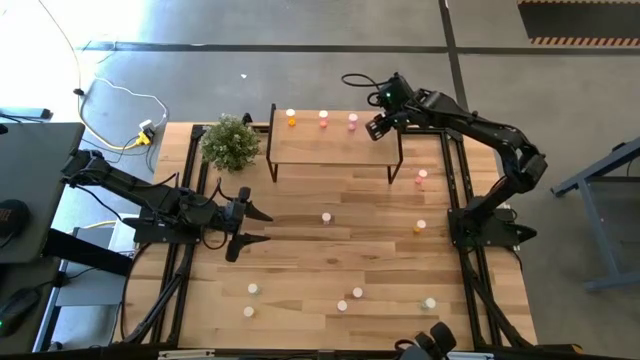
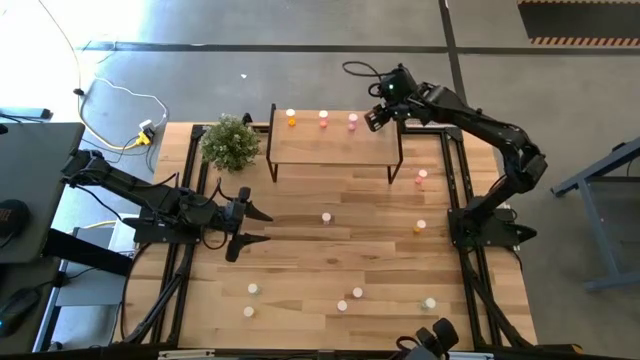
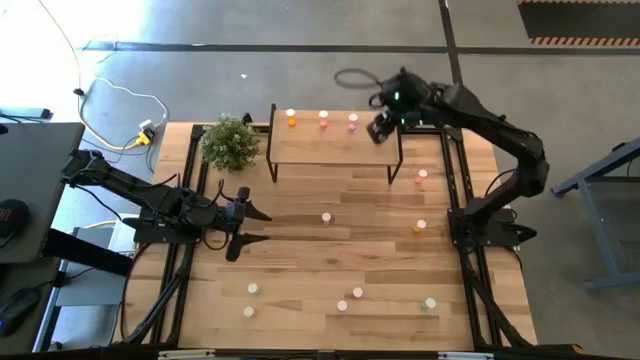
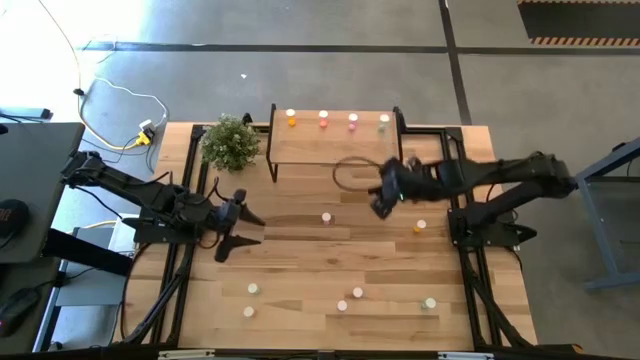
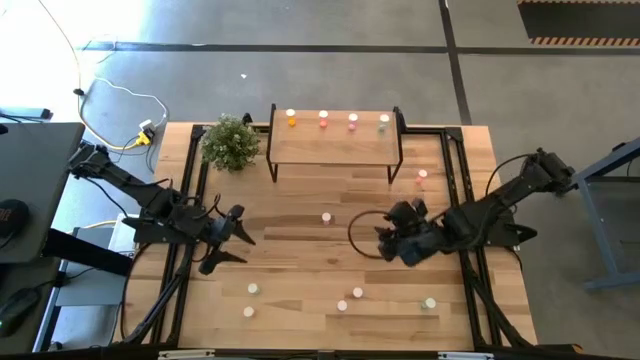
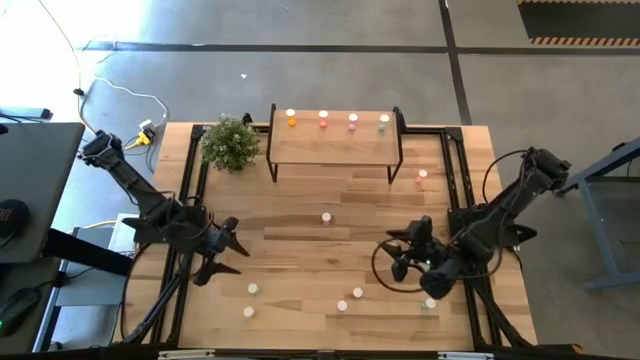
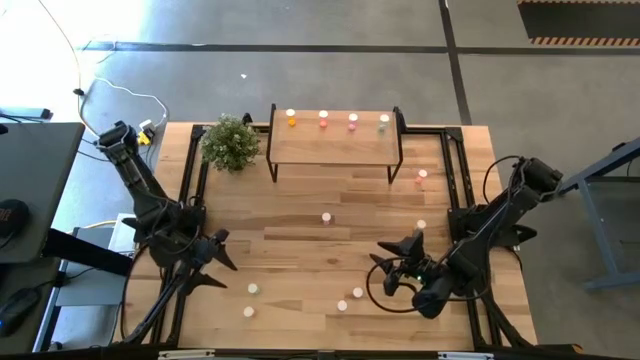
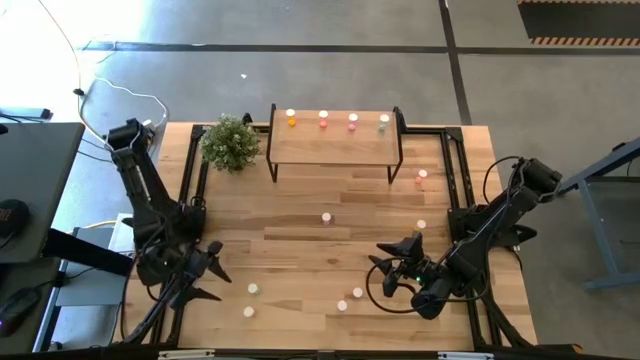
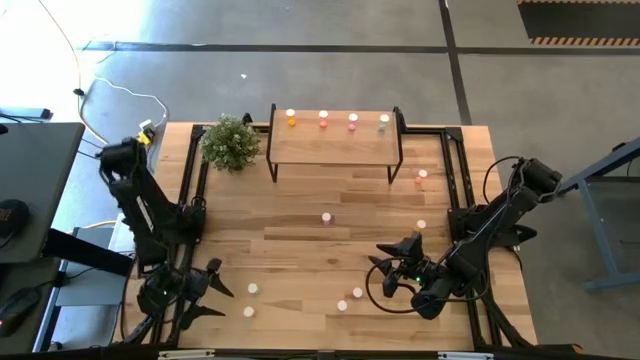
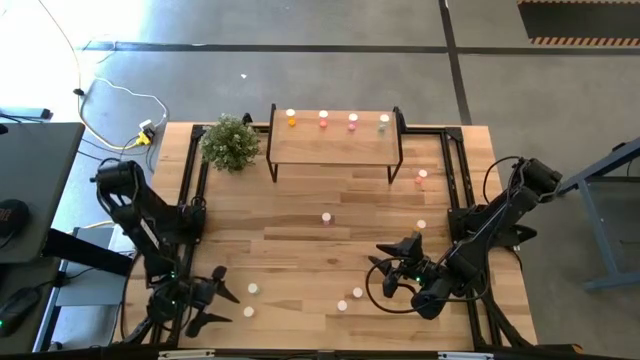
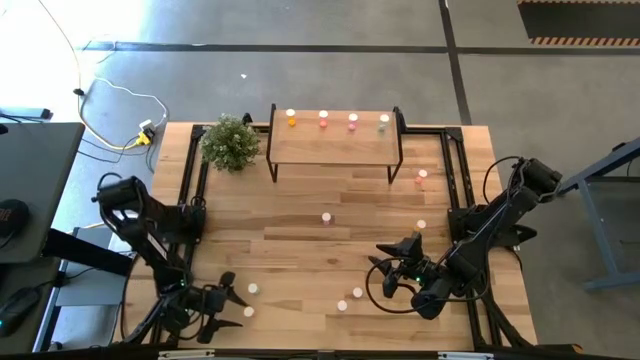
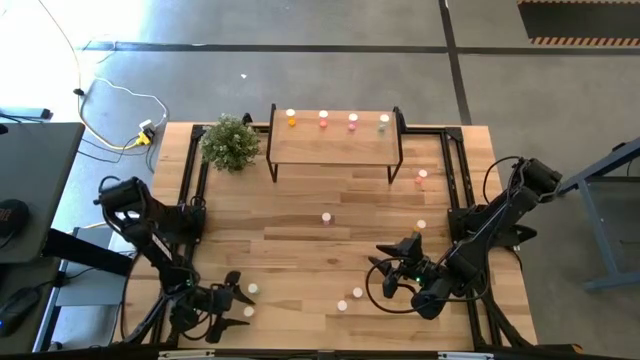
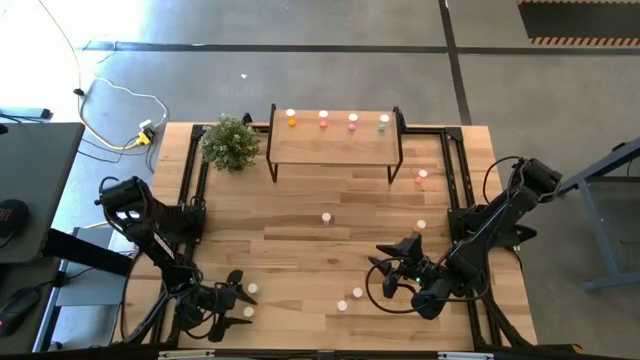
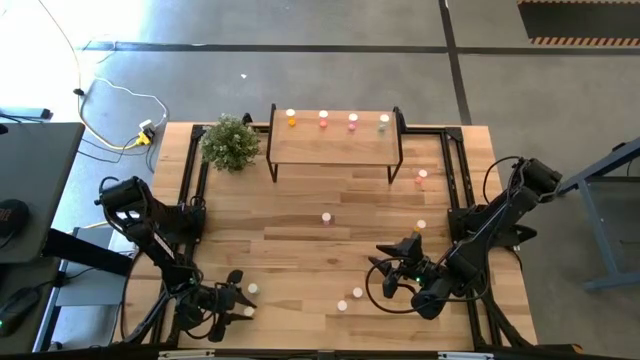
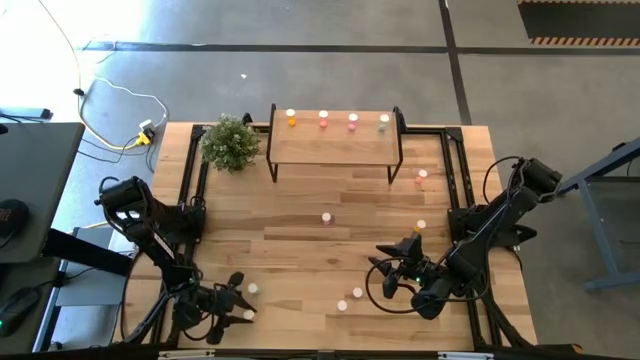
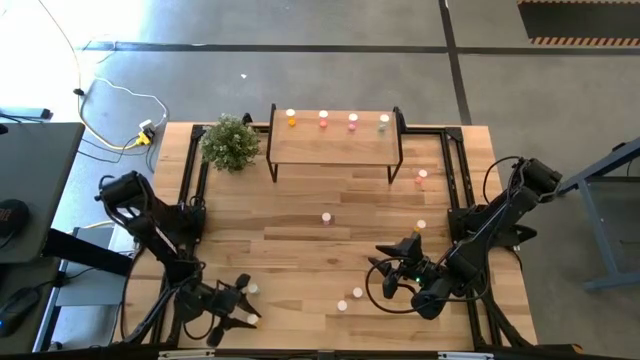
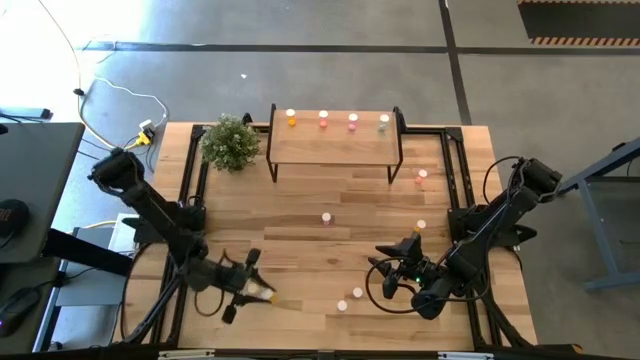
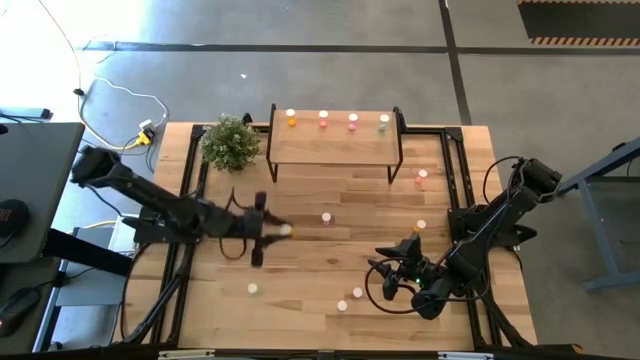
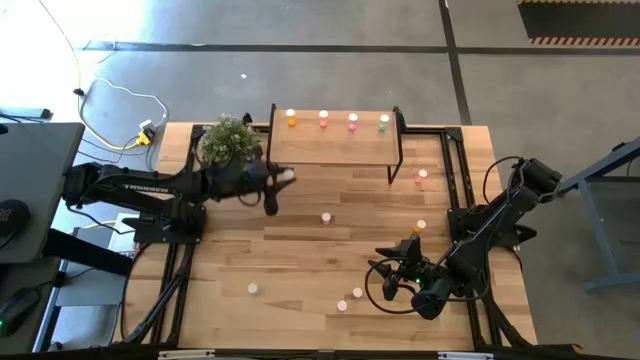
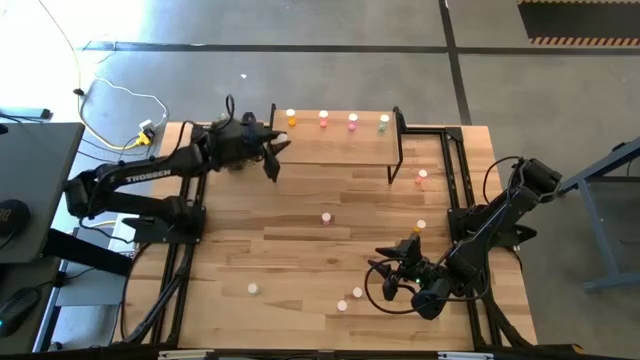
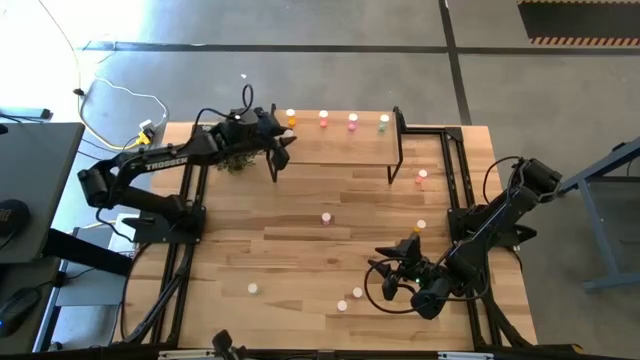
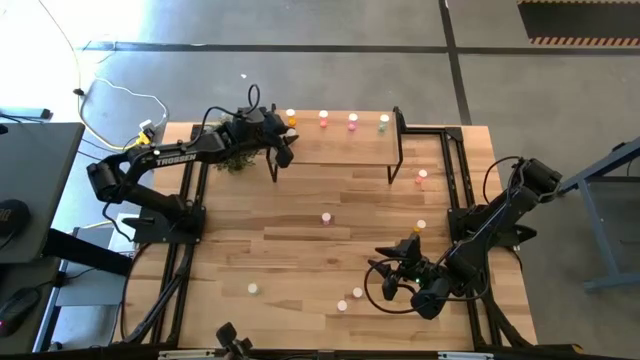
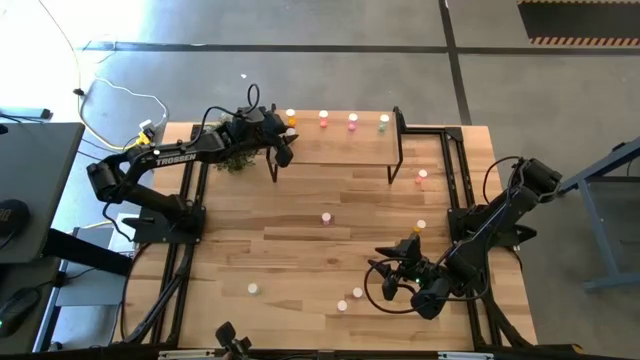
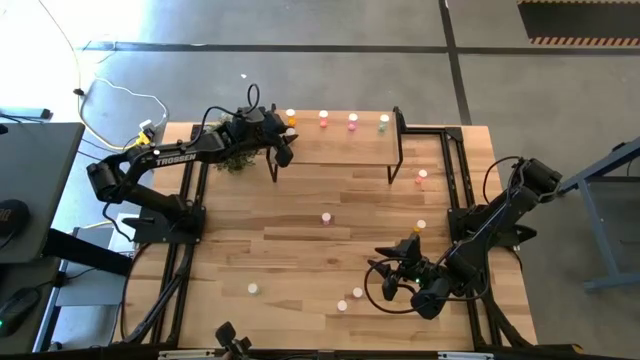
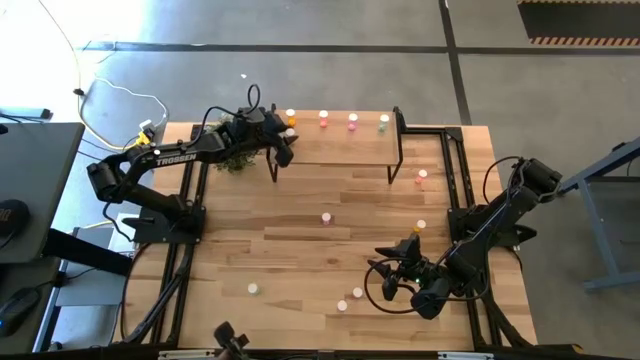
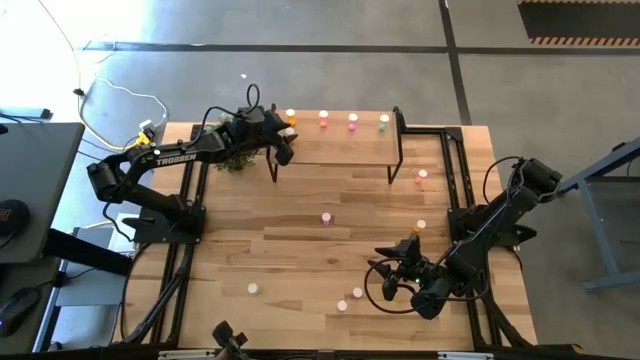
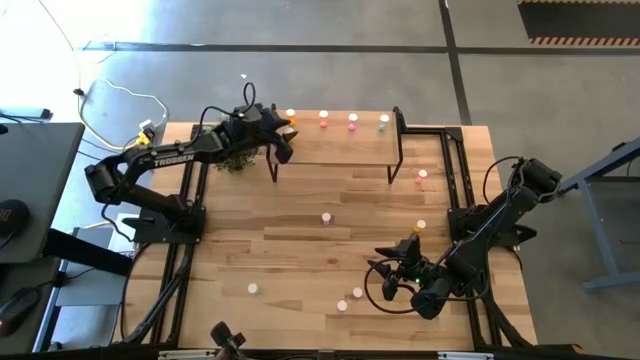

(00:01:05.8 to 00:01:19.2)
Task: Pick and place medicine bottles onto shelf by color
Put the bottom orange pill bottle aligned with the other orange pill bottle on the shelf

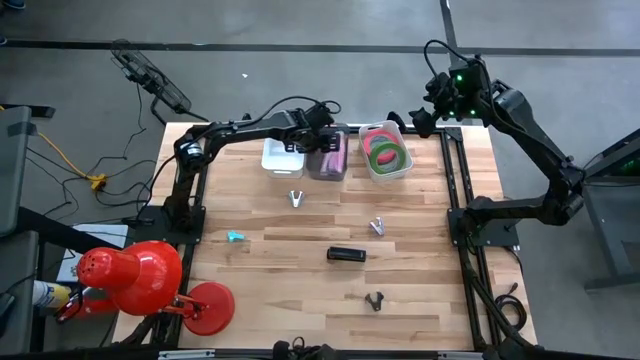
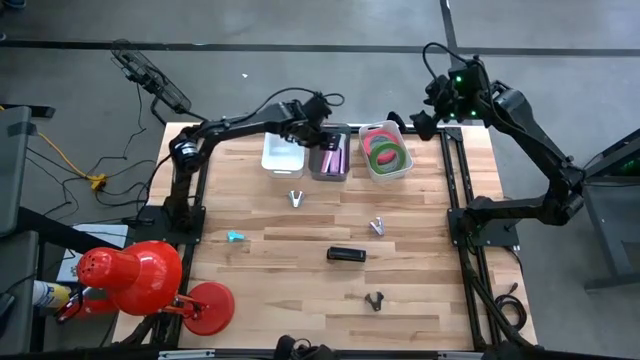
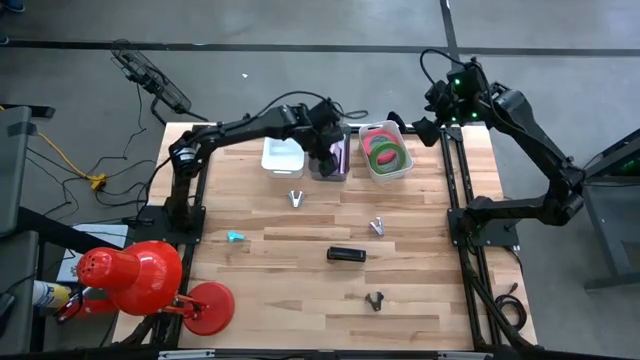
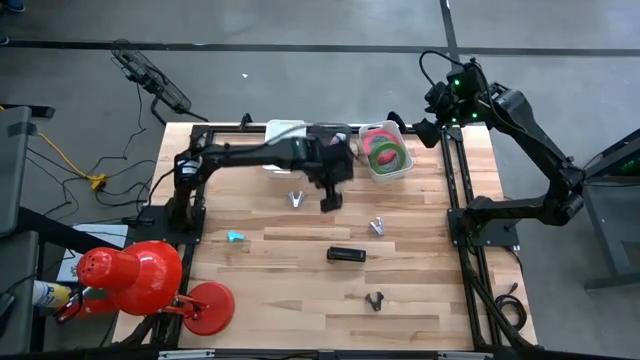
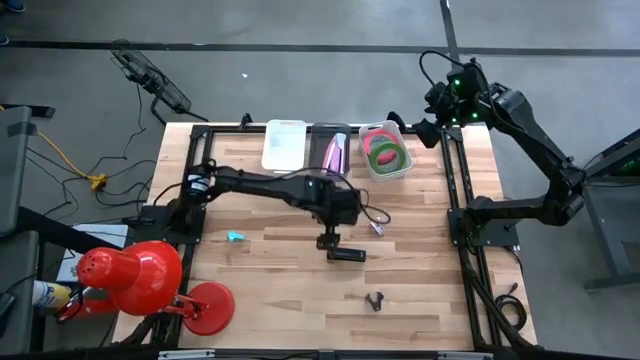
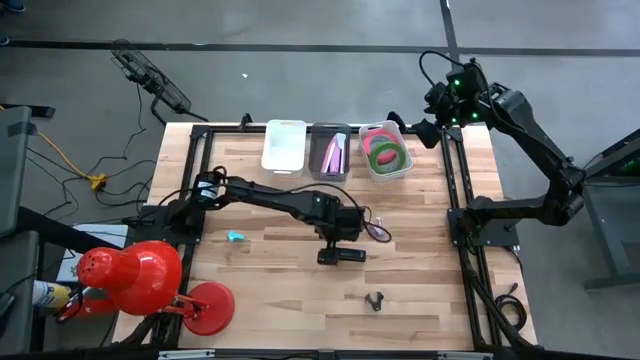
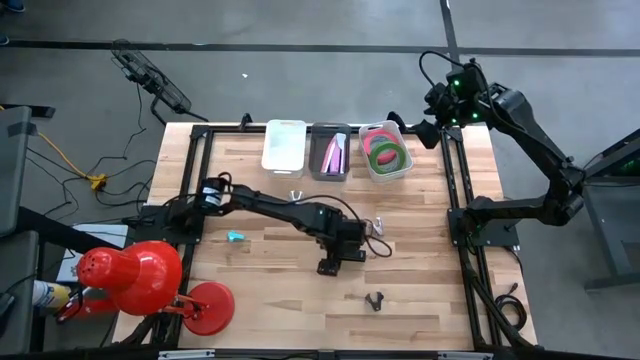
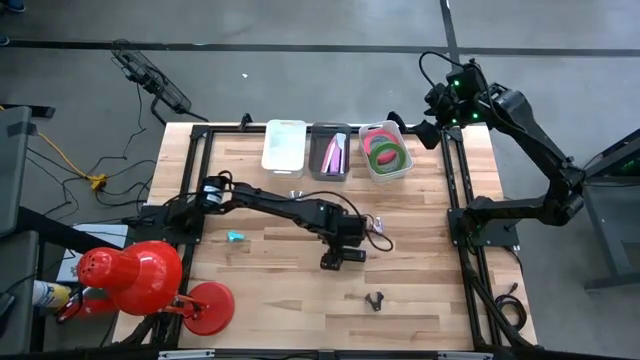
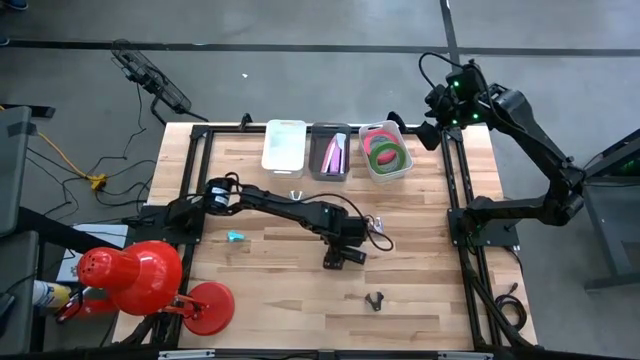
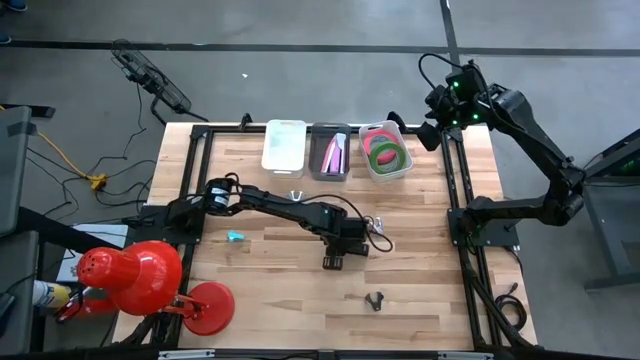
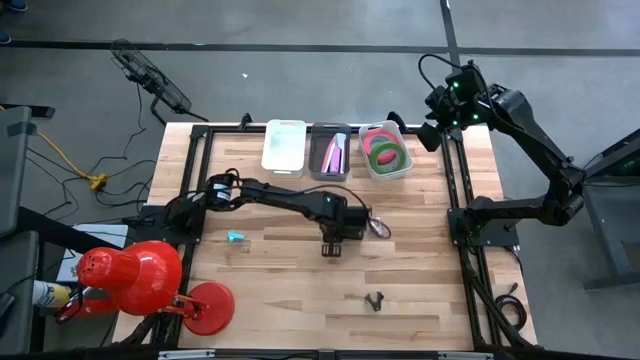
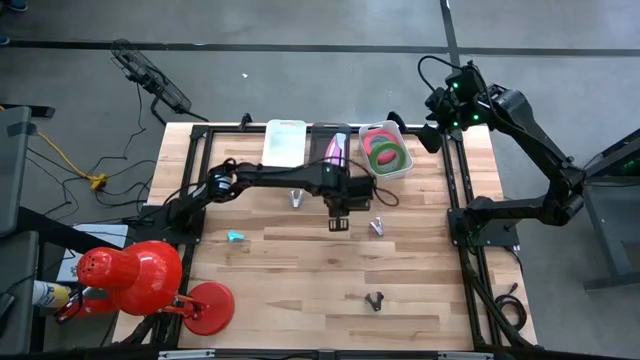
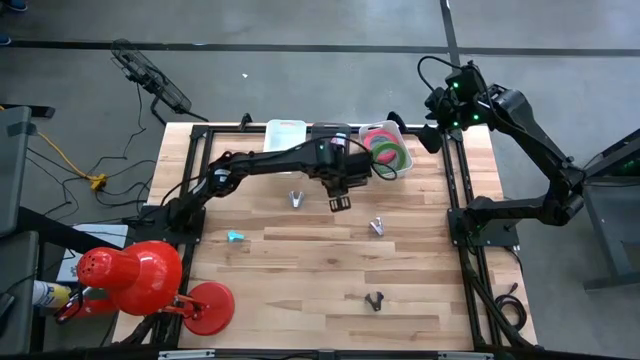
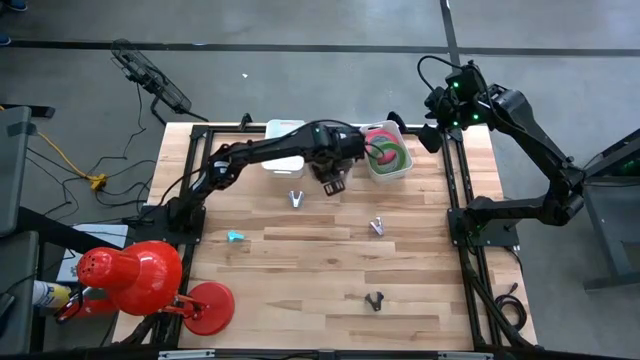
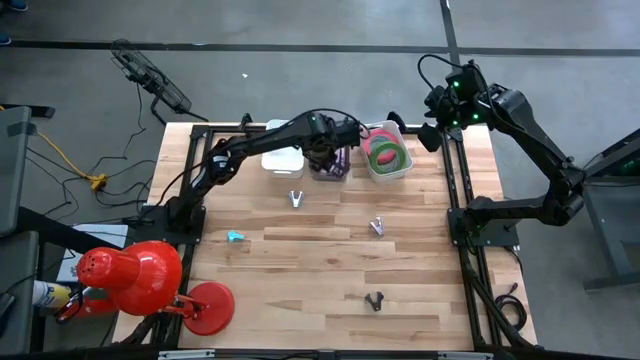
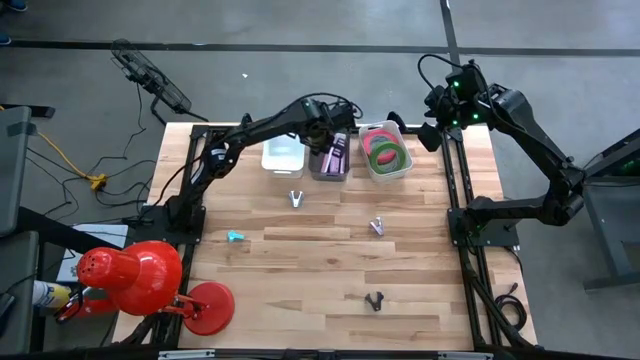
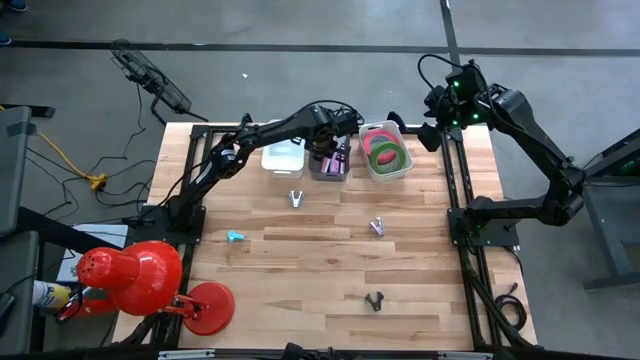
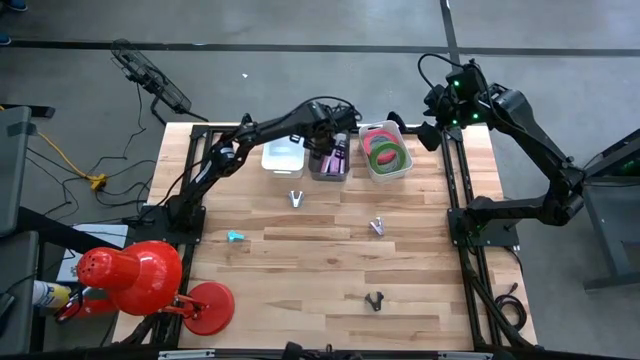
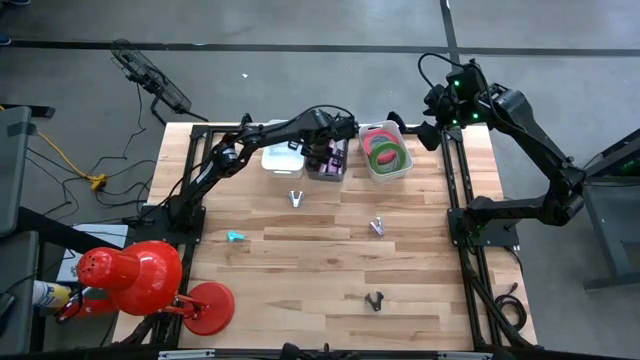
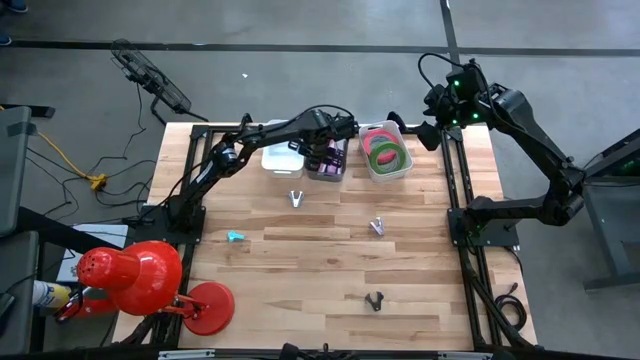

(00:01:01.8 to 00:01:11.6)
Task: Pick and place Stapler, Stapler remover, tape
Put the black stapler into the black bin
